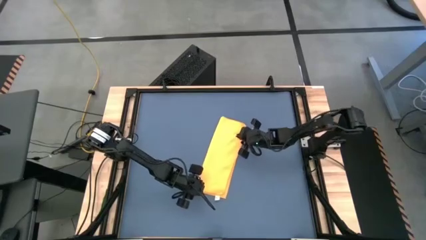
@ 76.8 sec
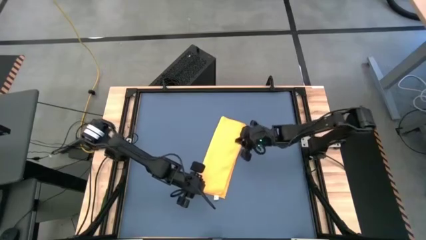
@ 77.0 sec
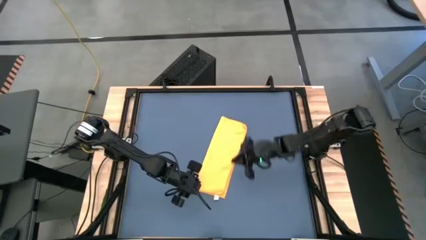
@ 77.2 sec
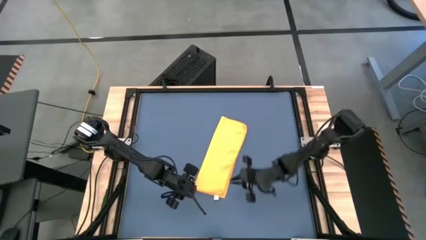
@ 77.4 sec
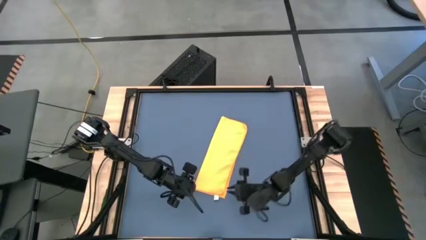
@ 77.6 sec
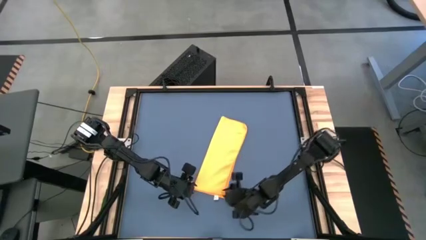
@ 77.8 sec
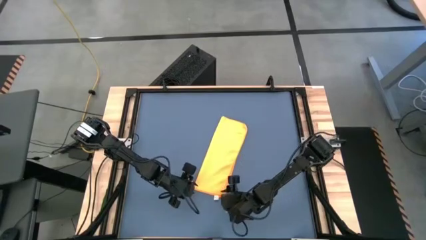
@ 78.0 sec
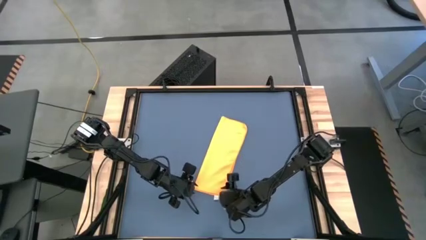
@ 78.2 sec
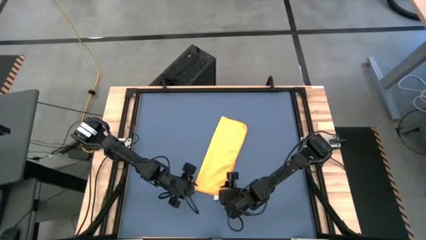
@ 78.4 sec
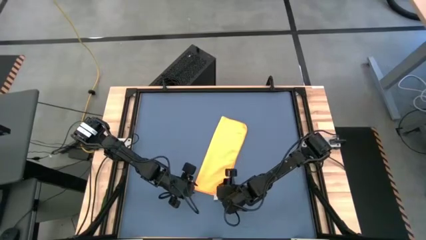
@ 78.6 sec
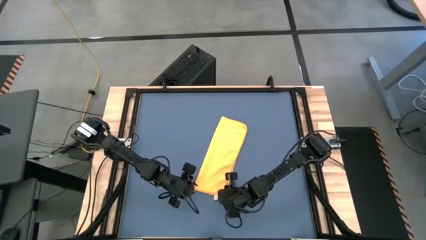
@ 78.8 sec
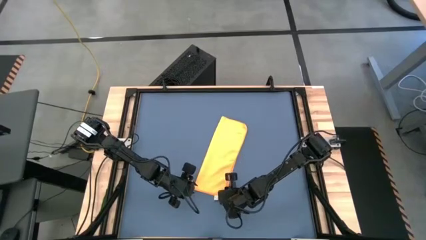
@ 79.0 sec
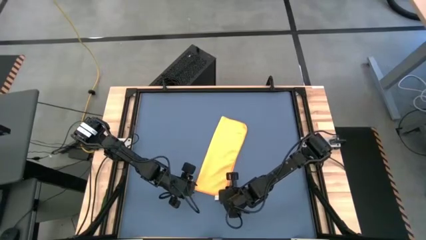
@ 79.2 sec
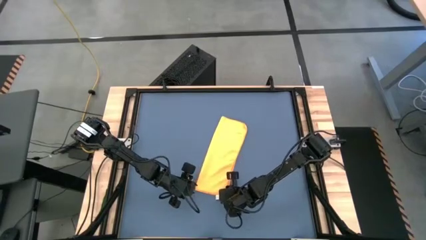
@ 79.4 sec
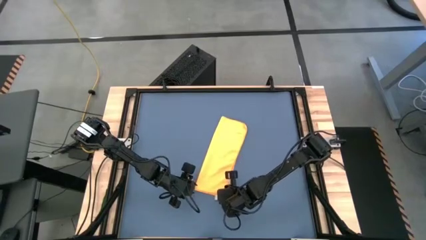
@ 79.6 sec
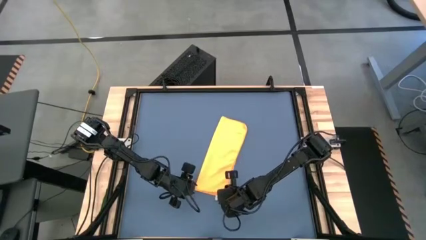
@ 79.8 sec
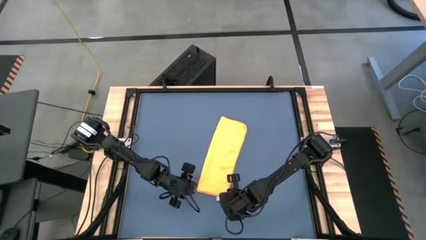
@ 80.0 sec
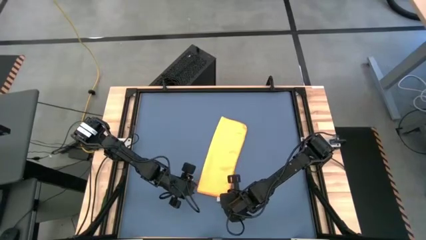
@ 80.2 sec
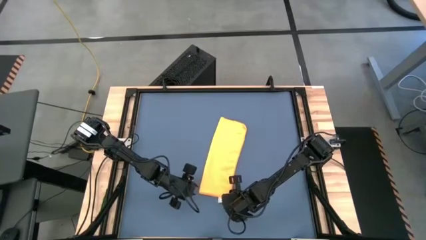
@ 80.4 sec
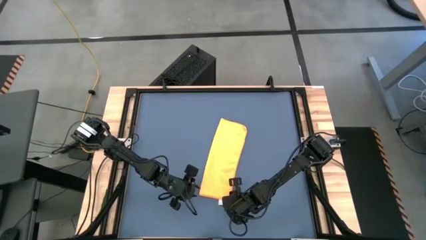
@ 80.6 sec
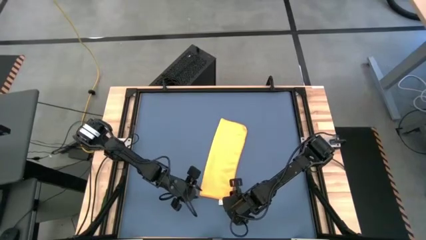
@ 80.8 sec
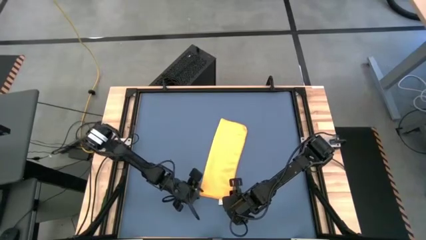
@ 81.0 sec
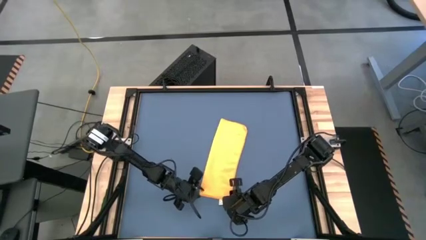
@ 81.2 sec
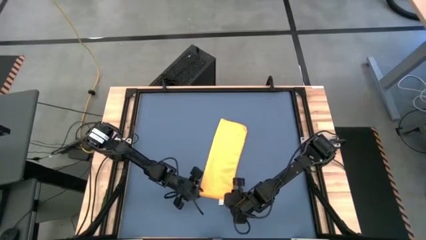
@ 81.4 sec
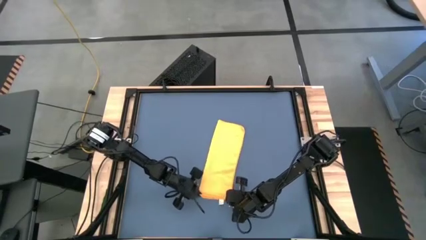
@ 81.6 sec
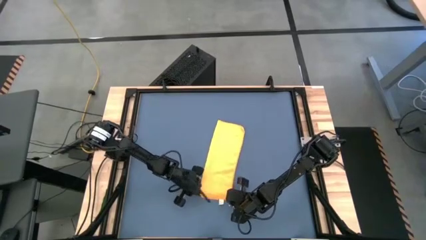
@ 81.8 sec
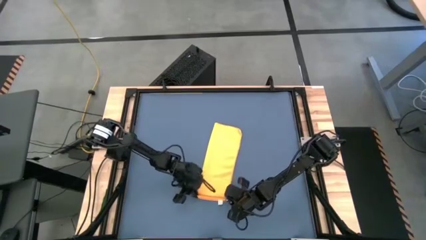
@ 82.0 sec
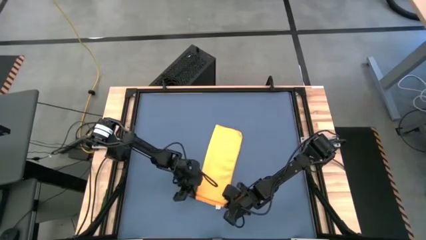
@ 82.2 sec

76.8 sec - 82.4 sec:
Task: Roll towel
Roll the orange microfiber towel

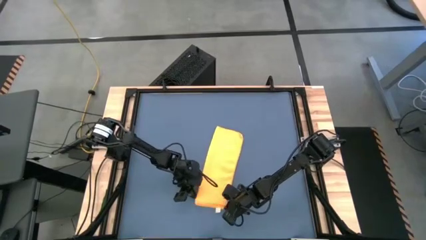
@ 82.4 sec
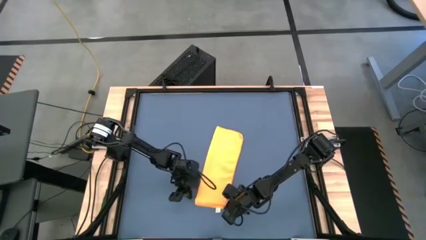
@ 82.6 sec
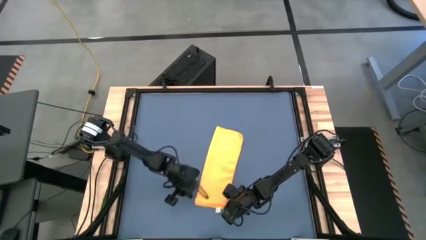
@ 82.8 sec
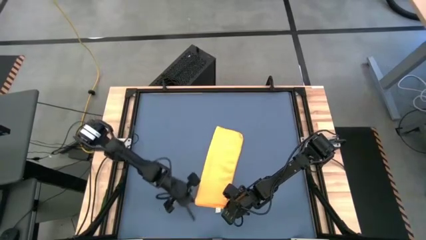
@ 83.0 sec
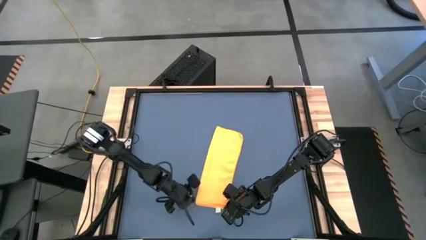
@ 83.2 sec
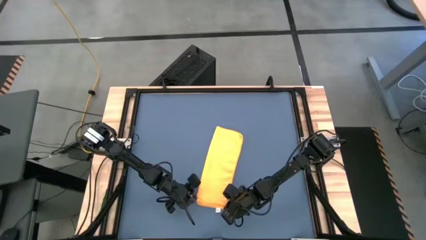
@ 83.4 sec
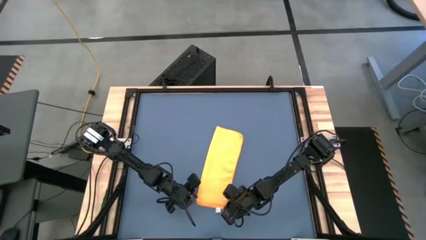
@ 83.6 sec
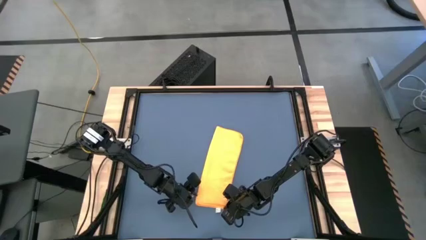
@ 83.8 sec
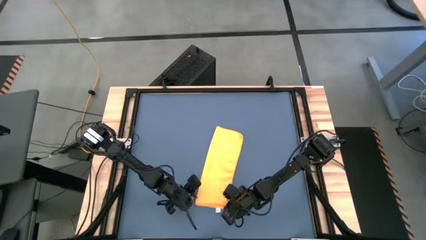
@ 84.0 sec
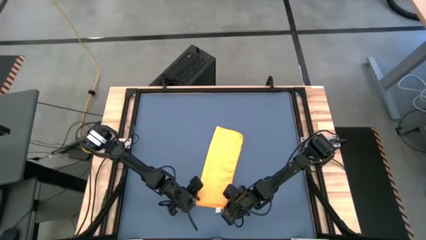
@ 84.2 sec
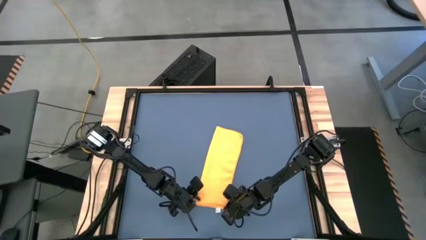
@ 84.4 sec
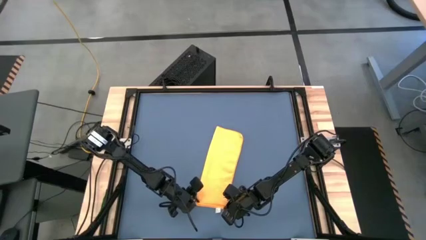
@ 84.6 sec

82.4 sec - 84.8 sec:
Roll the orange microfiber towel

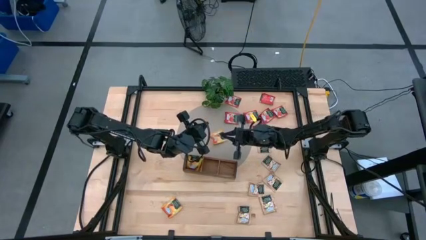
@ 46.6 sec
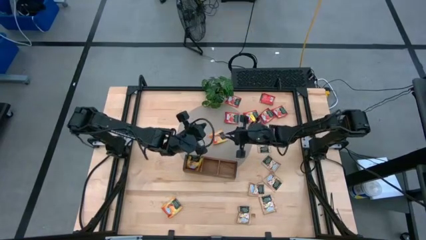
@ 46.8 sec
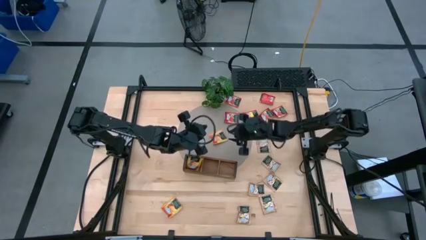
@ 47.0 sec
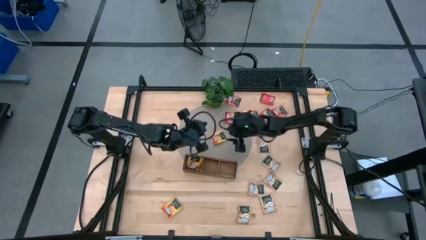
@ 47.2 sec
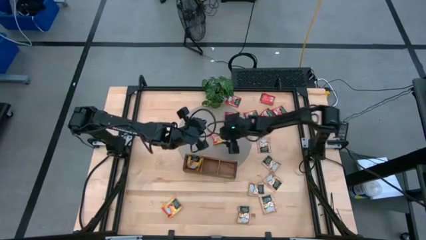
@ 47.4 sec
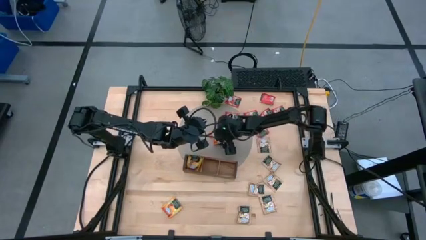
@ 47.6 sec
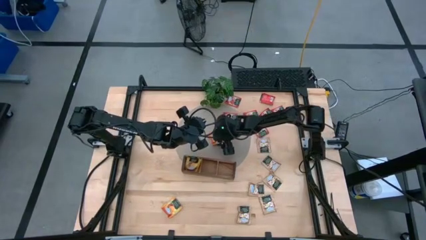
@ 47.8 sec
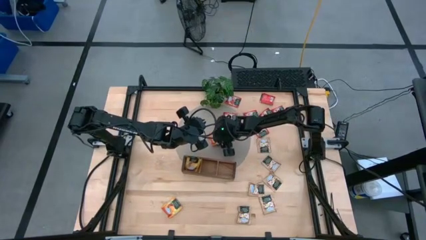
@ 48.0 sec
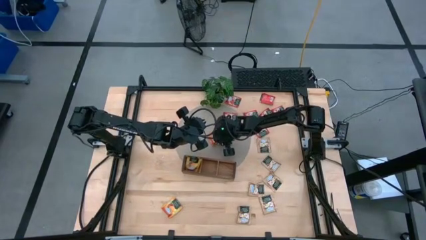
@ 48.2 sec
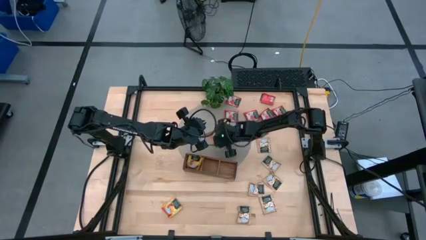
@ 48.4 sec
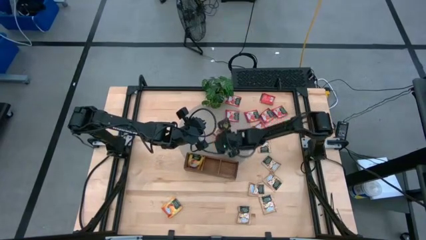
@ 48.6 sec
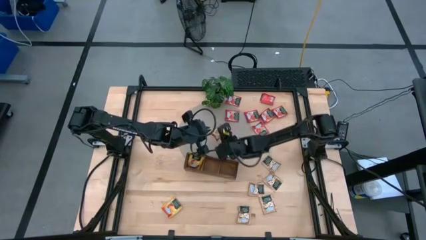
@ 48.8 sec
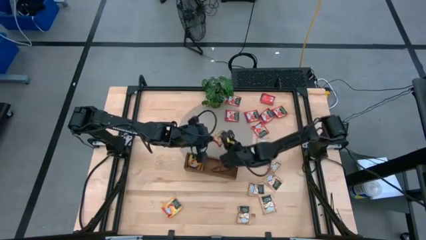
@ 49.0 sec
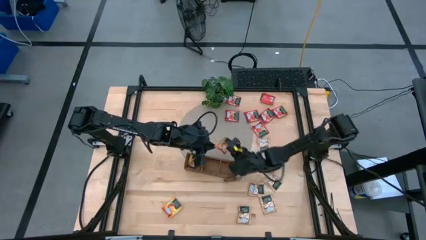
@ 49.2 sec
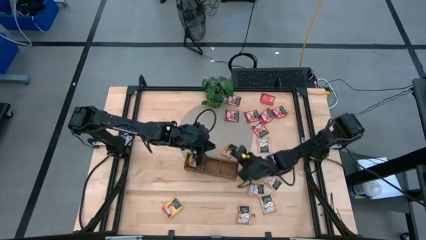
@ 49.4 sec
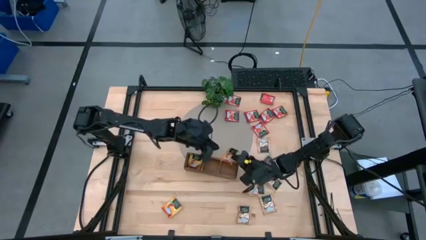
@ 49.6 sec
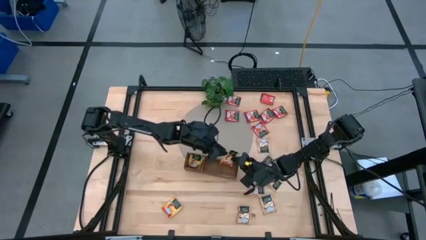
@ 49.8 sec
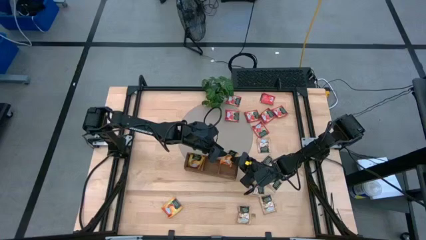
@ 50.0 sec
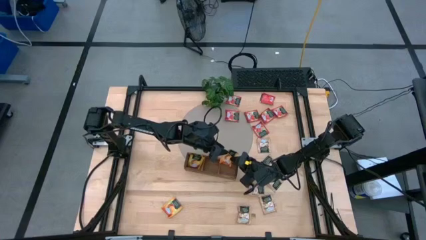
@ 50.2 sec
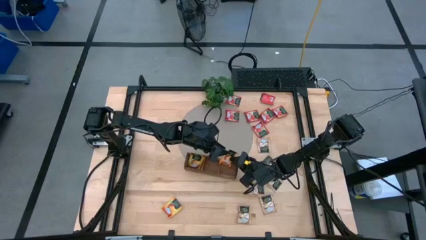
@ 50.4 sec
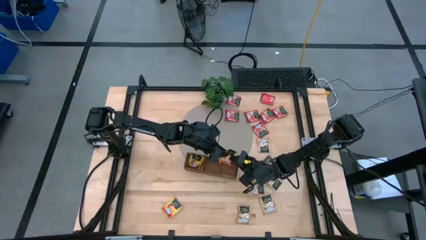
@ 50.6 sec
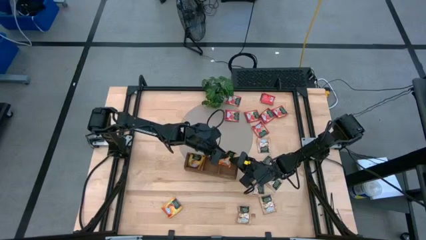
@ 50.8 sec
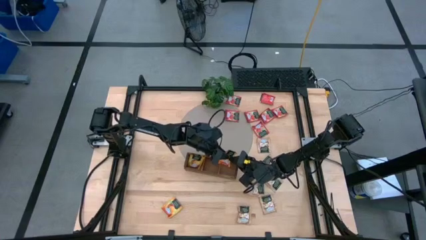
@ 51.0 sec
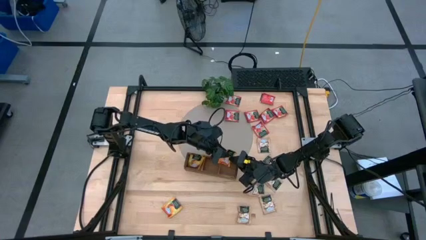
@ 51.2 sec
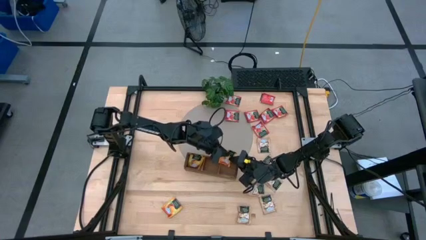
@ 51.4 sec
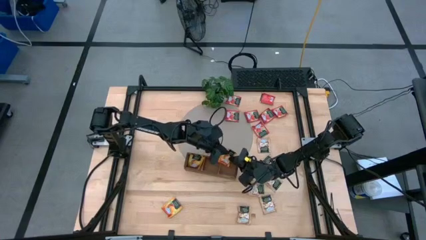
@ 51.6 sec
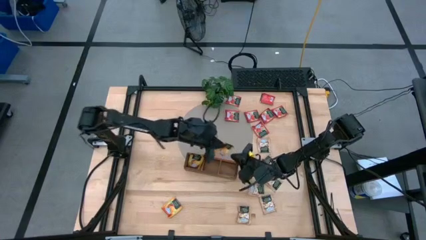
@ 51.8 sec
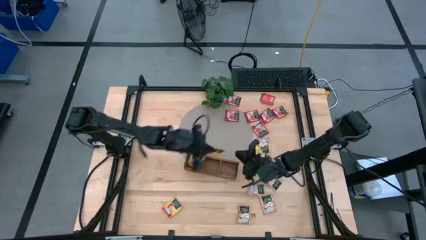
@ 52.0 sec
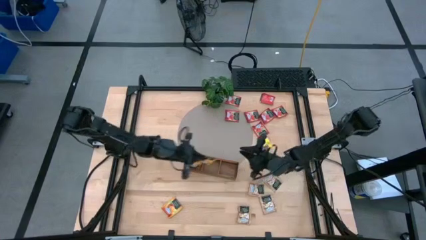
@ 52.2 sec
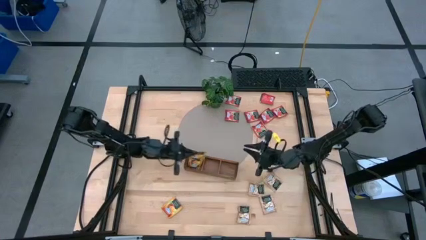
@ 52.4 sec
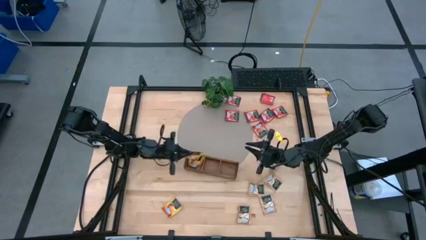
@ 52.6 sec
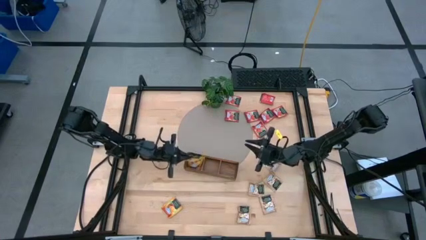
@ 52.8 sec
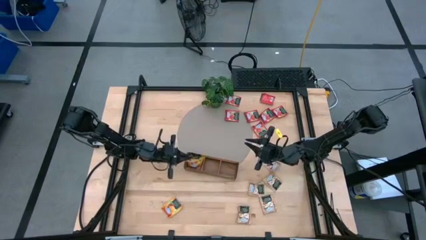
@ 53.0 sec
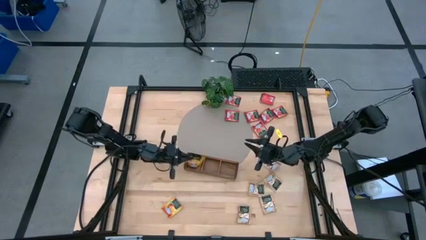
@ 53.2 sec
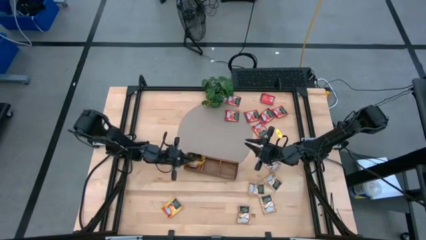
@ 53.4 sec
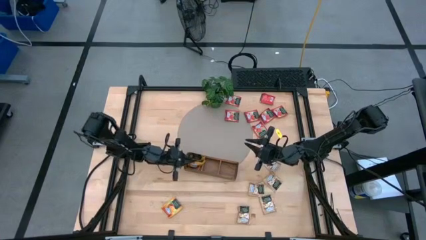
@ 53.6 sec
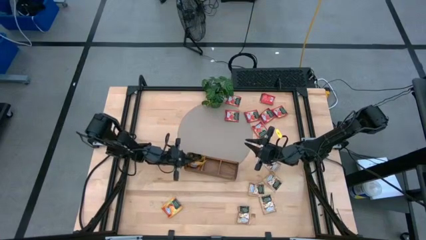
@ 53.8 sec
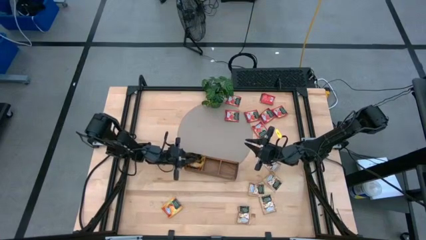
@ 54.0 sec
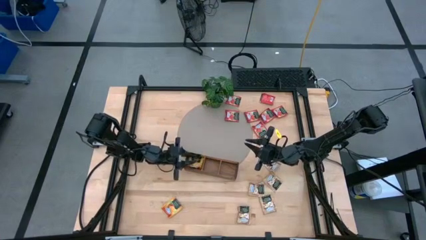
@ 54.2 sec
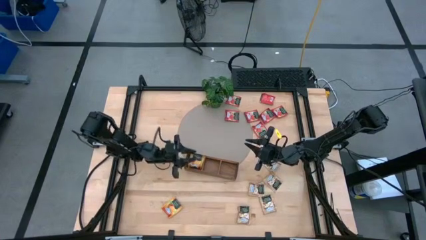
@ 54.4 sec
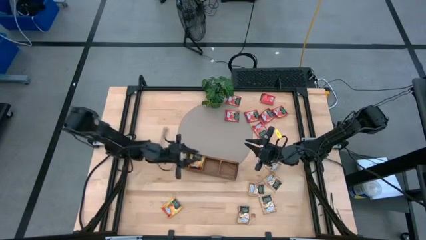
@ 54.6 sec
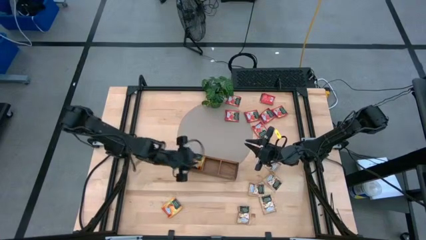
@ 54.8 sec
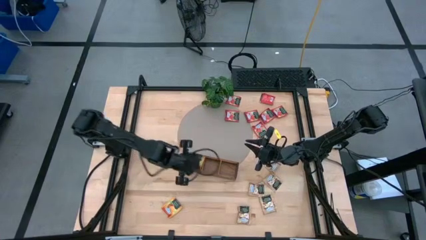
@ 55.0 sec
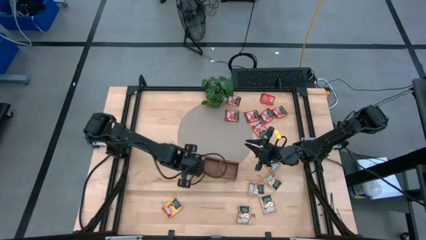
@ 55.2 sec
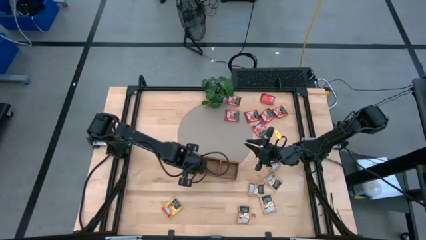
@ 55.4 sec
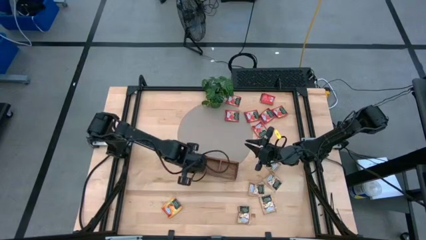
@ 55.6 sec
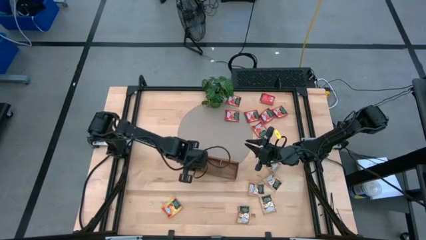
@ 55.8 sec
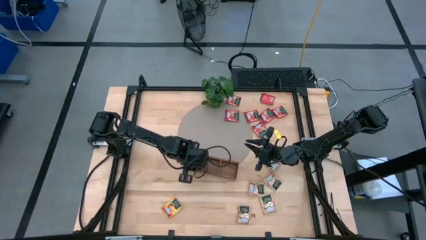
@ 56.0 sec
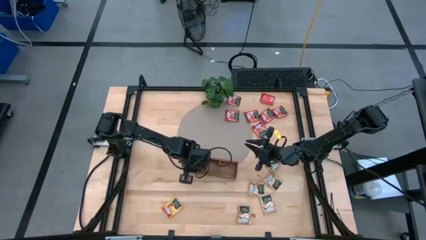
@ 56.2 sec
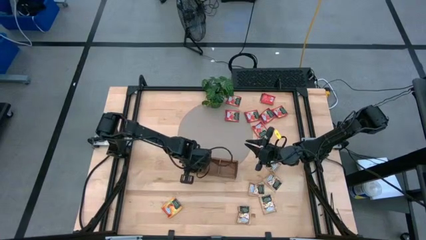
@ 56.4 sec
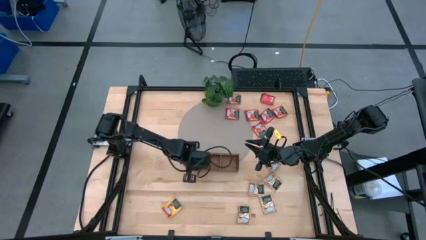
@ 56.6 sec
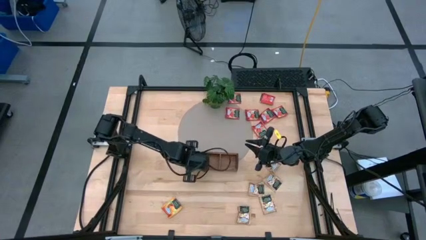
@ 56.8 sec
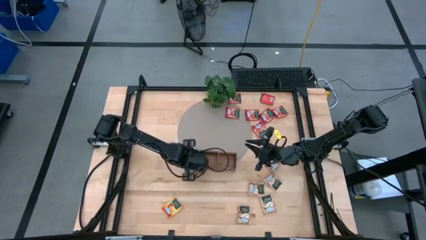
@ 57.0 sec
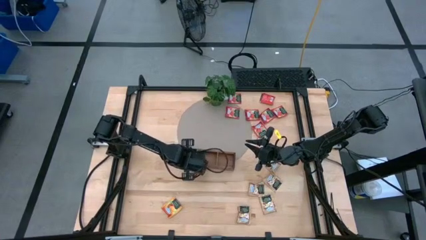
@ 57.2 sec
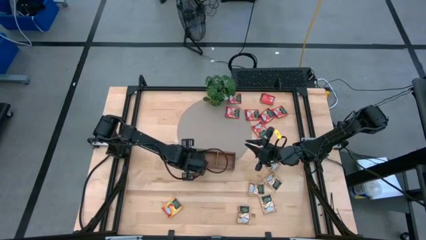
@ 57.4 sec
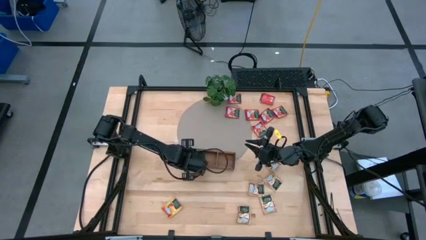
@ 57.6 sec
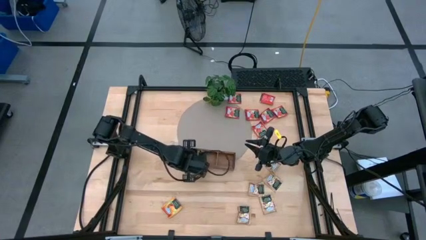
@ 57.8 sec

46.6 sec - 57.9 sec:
Task: Pick & Place Tea
Put the top orange tea bag into the left slot of the wooden organizer
